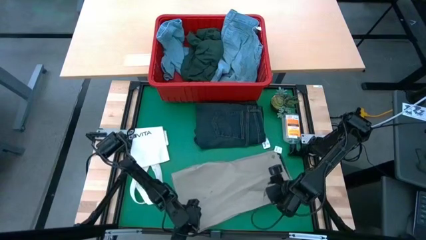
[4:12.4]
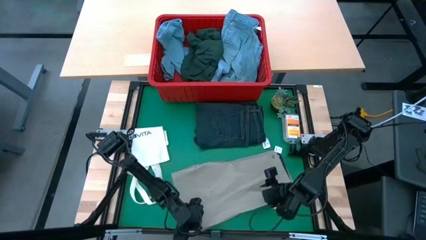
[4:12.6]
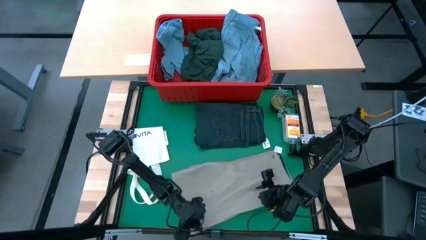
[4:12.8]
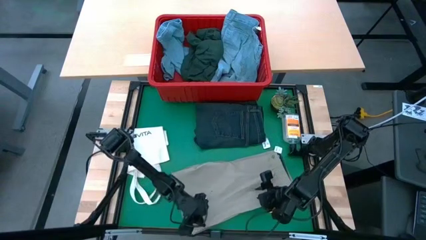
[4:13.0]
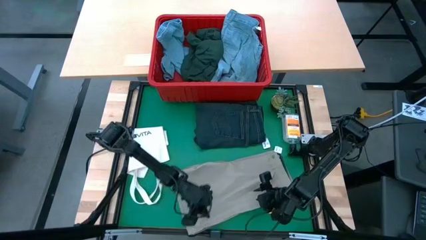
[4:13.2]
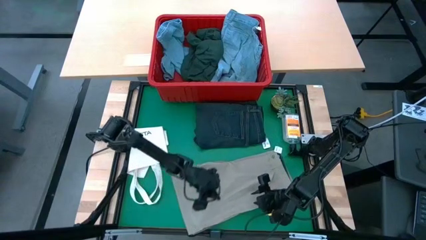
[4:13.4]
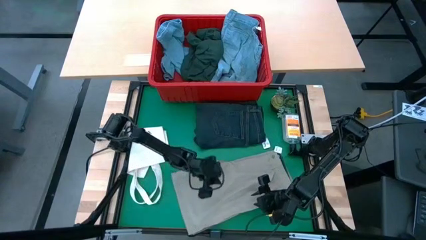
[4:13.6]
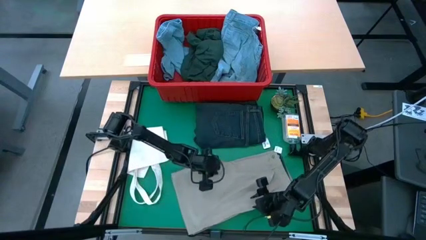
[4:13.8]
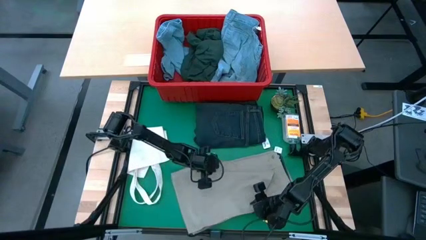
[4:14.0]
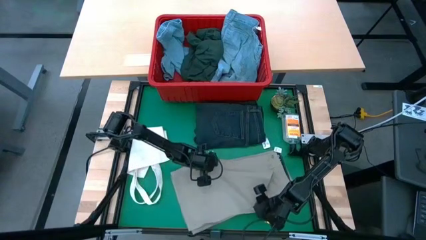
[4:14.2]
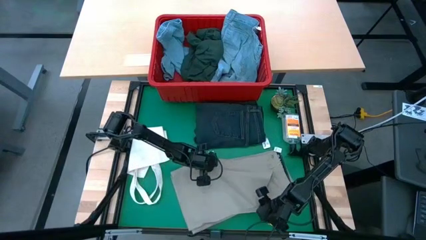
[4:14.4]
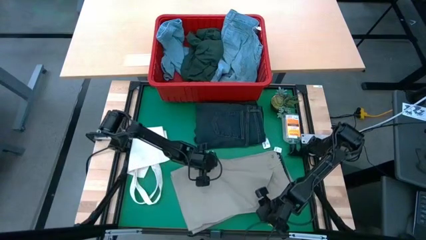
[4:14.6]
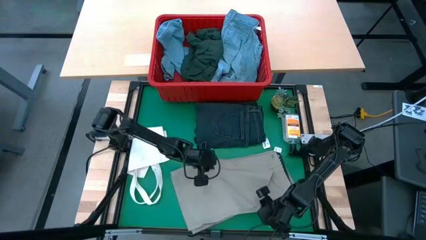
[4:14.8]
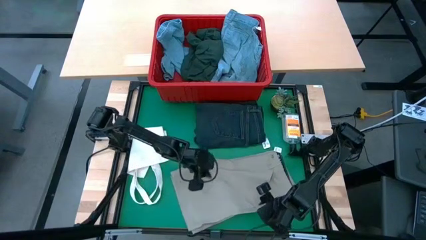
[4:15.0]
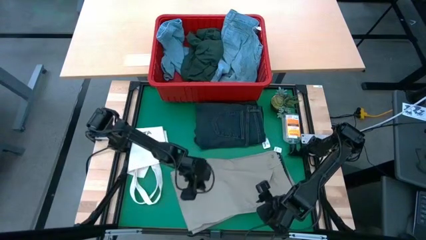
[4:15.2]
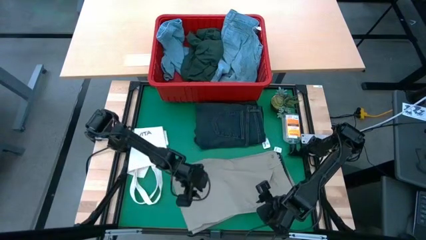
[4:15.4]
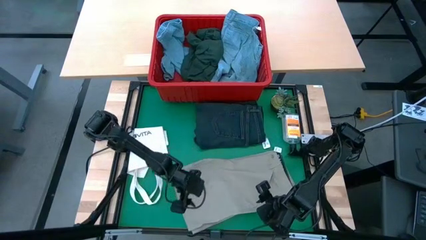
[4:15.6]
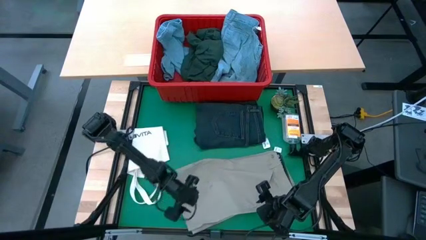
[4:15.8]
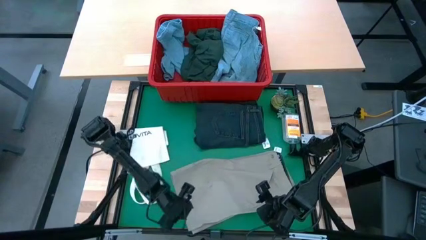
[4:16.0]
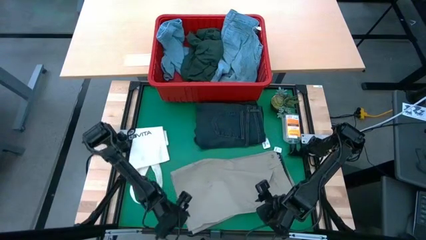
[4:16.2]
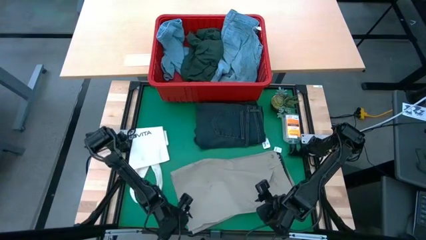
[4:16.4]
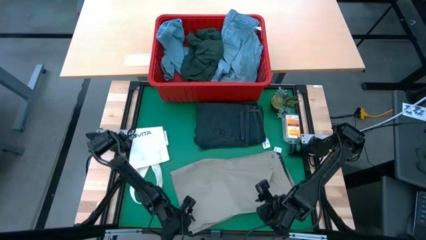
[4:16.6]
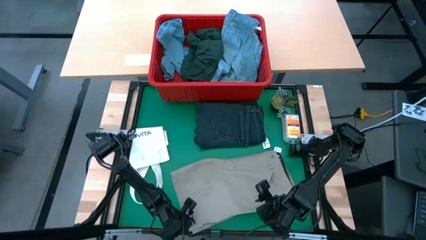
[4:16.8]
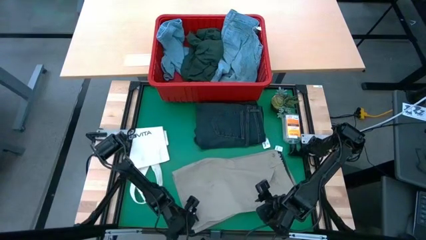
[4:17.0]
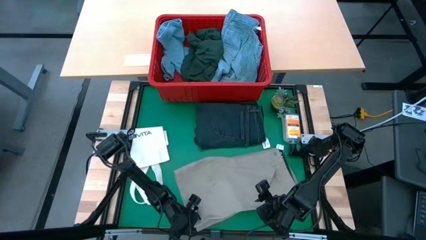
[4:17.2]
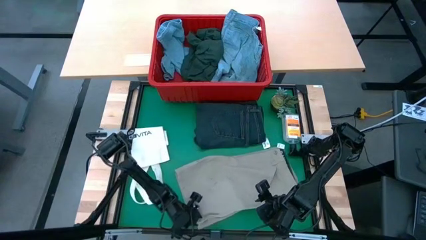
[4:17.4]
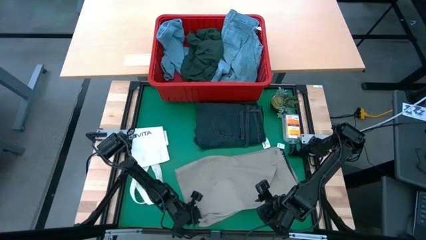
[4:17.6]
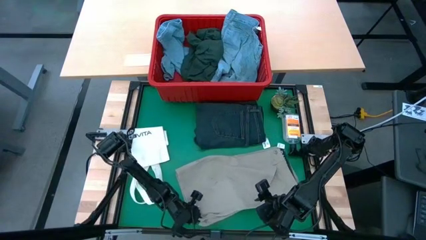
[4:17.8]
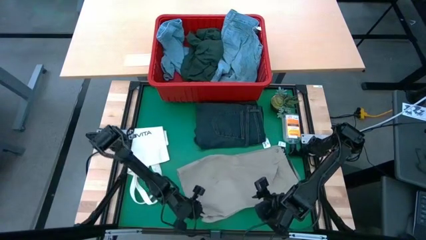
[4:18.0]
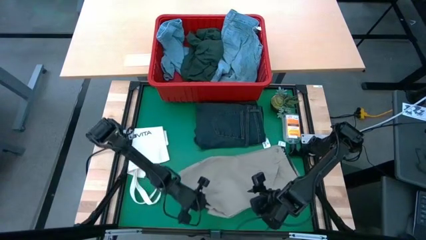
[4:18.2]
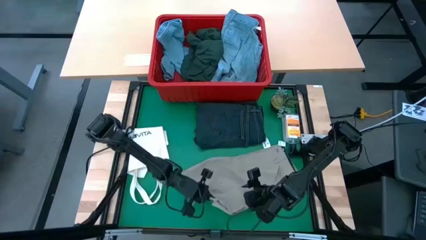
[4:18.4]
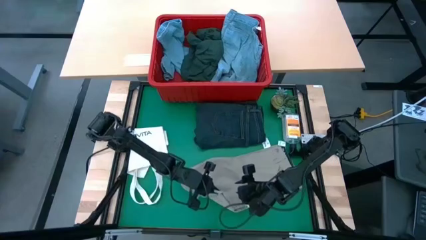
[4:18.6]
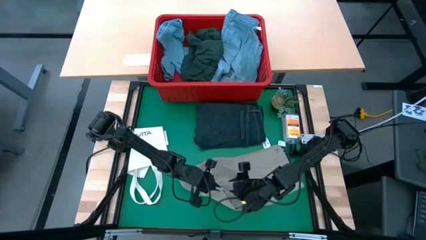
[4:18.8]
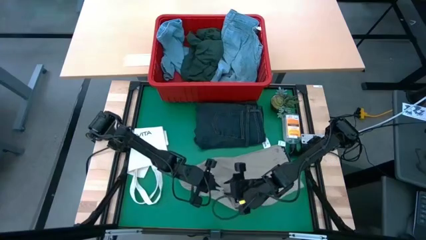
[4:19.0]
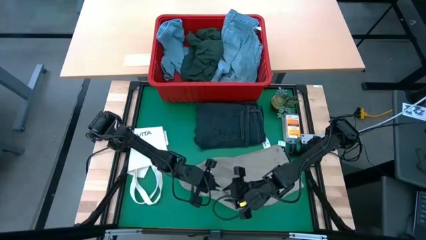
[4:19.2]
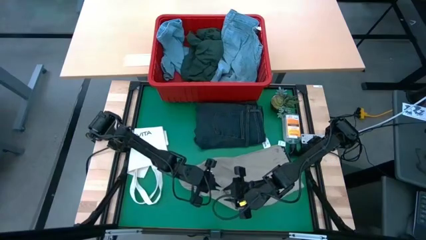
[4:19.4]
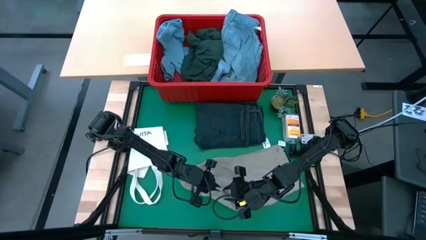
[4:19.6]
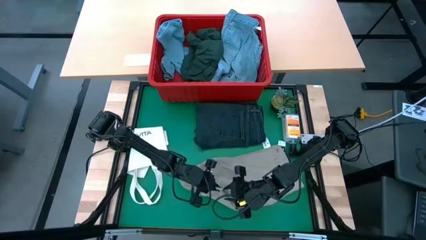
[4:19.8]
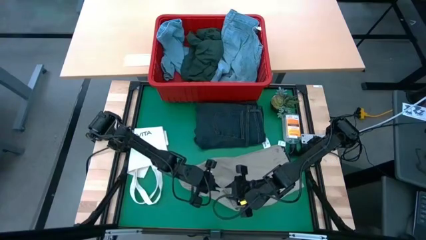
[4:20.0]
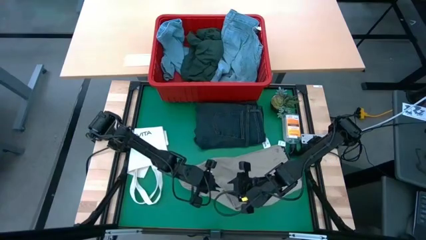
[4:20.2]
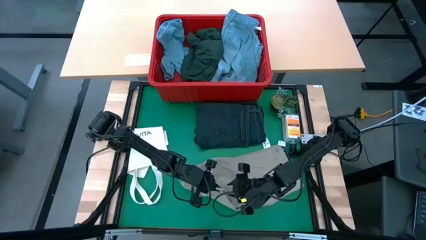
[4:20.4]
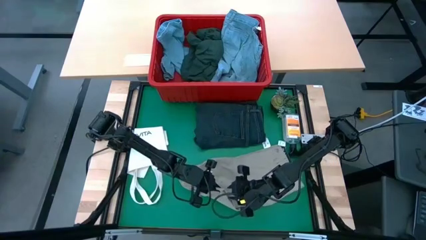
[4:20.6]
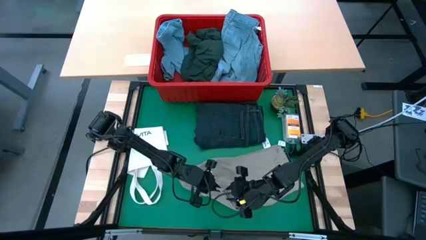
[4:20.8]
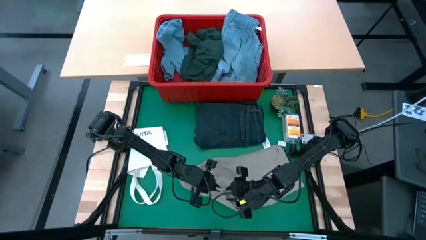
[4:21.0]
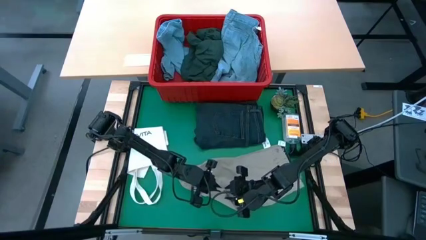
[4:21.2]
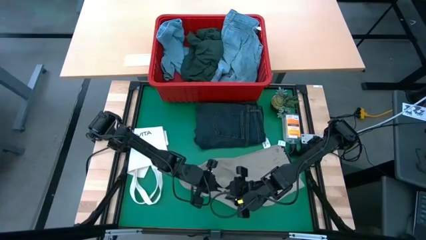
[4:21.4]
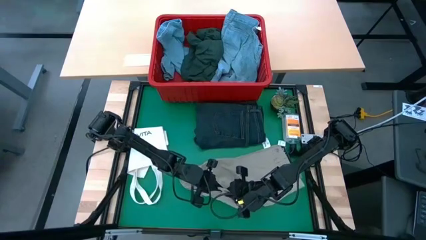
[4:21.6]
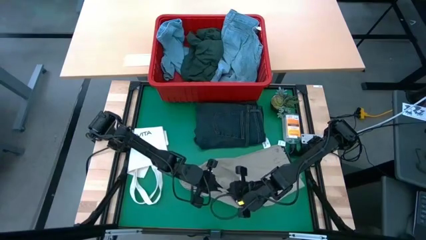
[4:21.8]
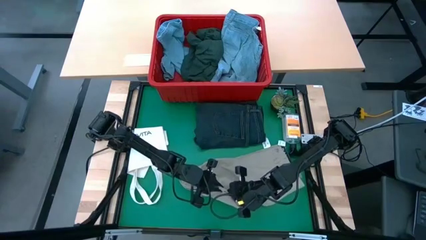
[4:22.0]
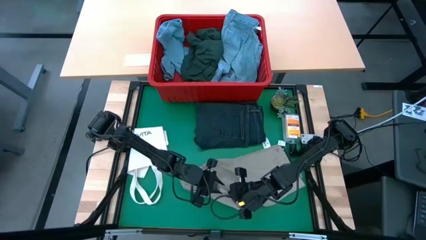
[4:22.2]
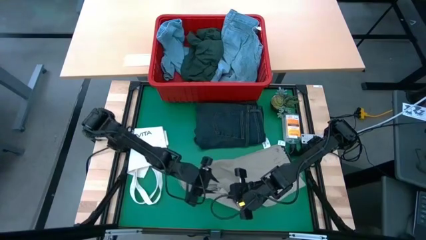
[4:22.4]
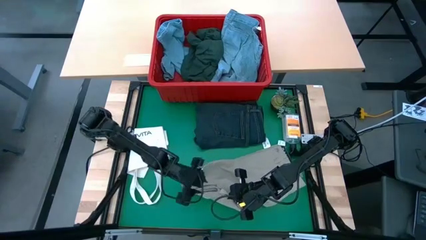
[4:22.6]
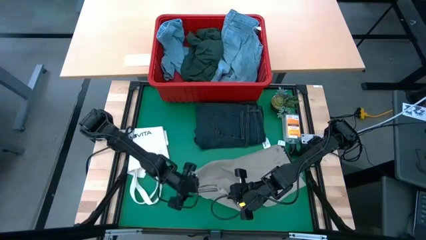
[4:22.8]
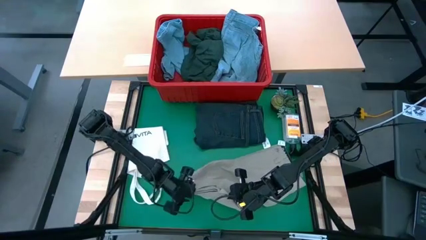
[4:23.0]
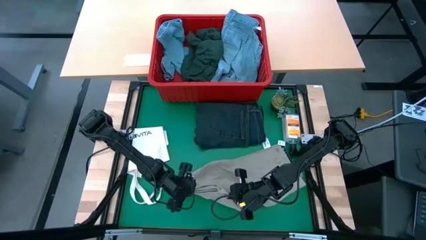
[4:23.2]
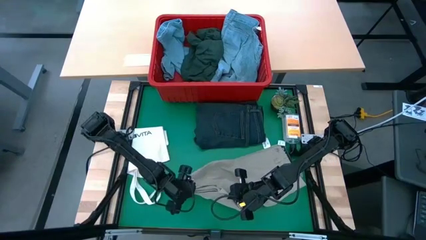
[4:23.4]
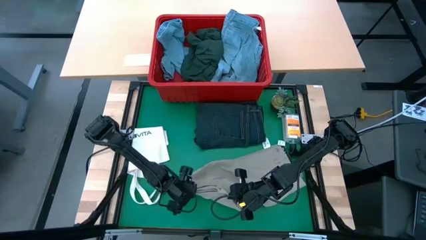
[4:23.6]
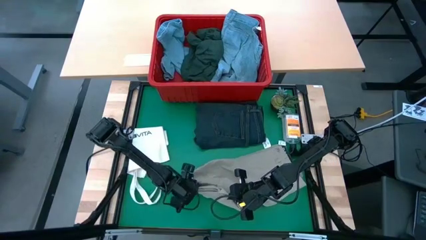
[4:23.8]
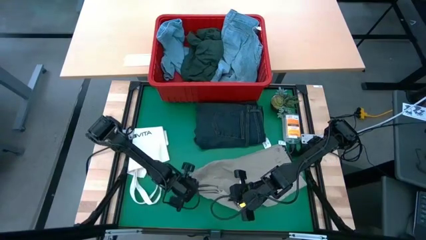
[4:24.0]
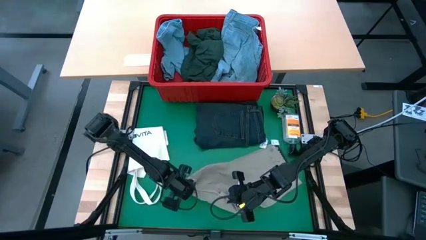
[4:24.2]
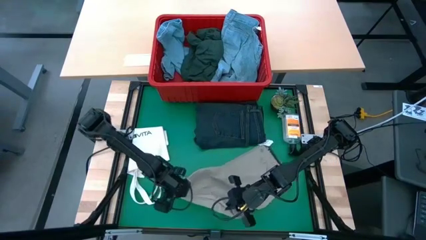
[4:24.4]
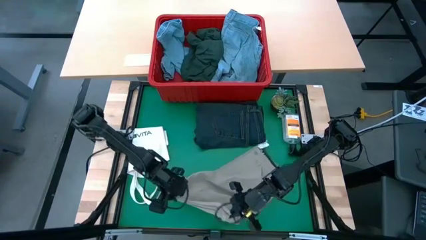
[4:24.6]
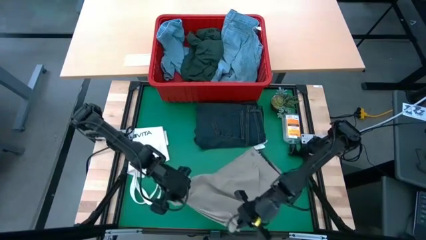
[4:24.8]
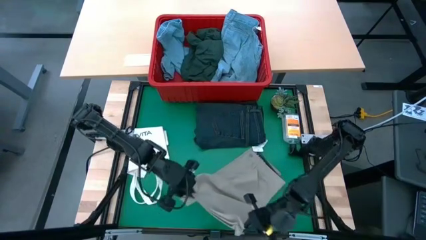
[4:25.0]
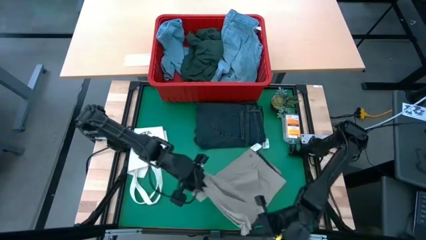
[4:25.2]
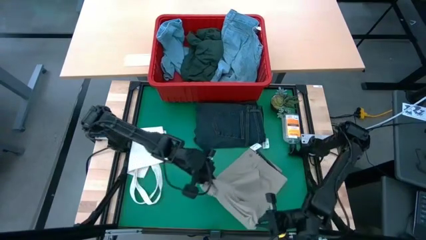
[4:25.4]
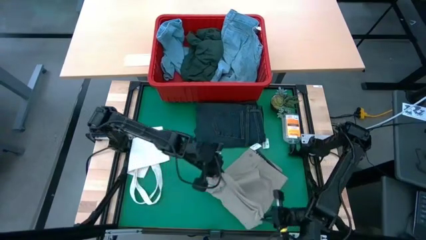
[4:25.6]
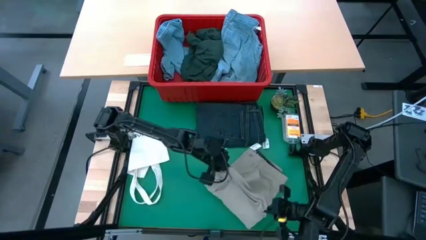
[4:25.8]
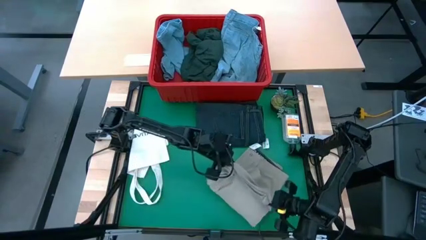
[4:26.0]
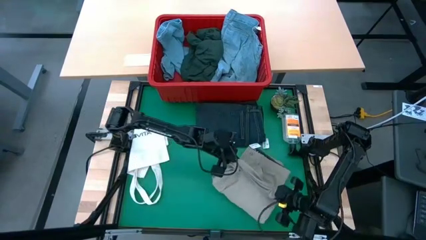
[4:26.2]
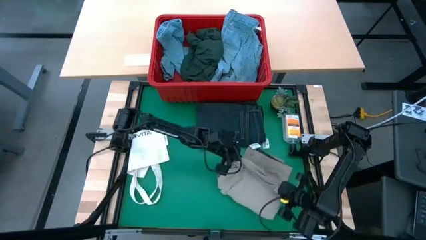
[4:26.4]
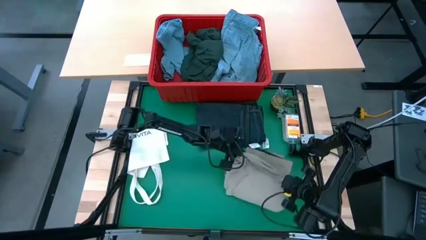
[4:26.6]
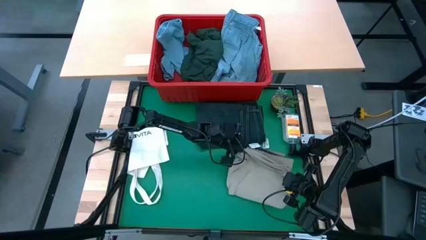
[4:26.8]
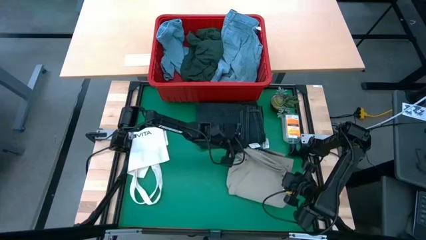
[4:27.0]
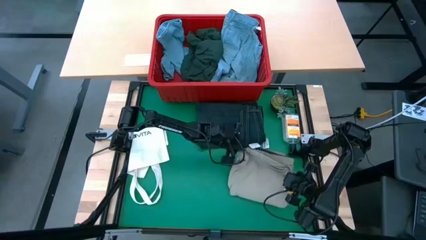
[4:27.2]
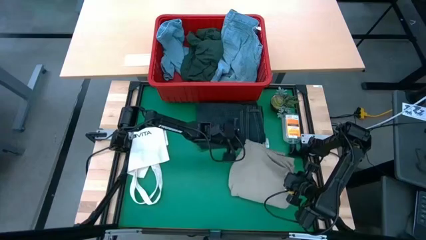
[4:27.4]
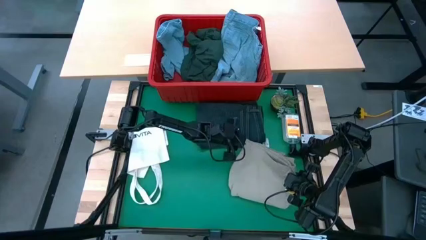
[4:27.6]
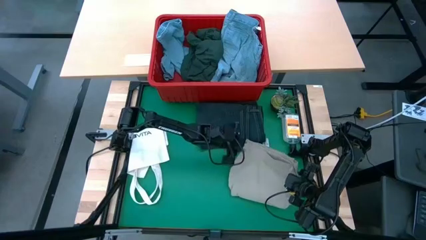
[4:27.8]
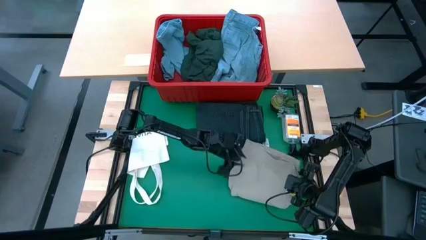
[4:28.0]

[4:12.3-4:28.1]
Task: Fold laundry
Fold the brown shorts

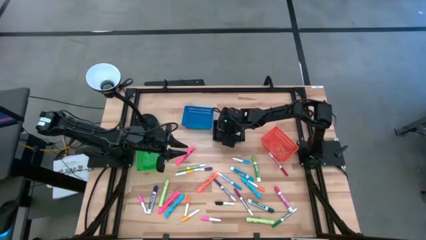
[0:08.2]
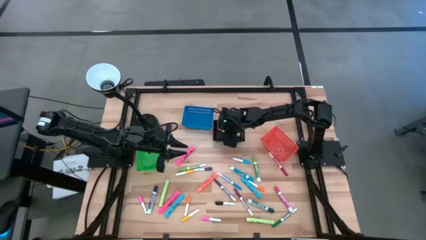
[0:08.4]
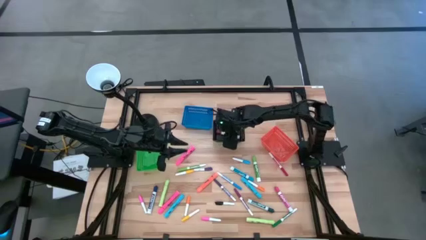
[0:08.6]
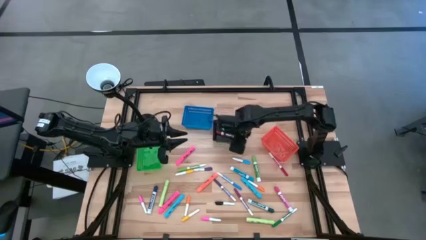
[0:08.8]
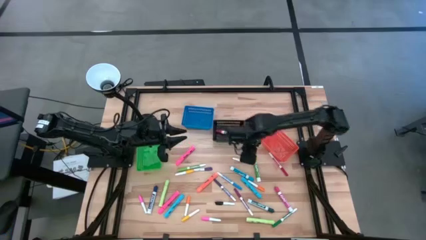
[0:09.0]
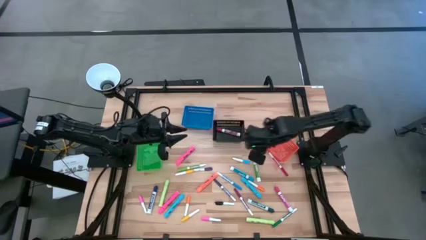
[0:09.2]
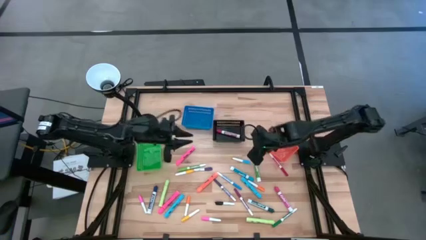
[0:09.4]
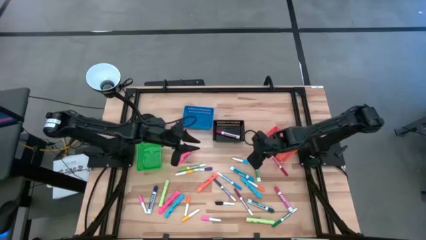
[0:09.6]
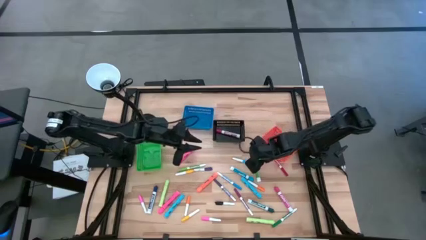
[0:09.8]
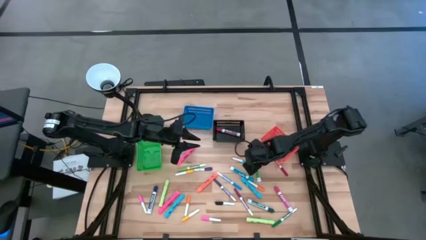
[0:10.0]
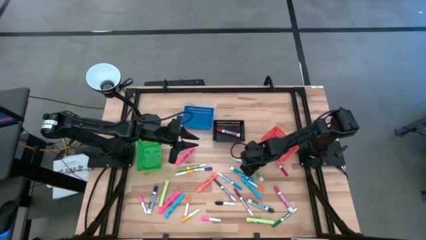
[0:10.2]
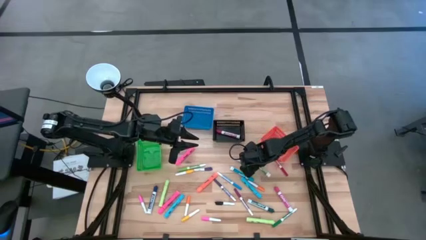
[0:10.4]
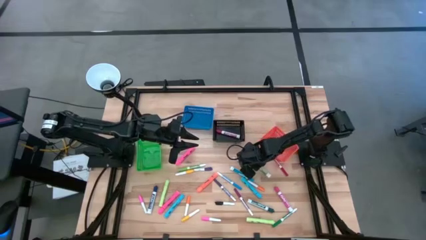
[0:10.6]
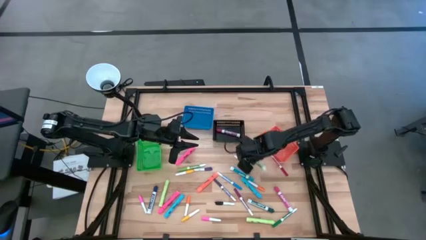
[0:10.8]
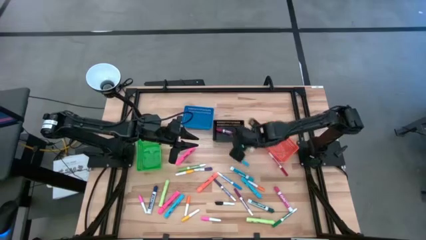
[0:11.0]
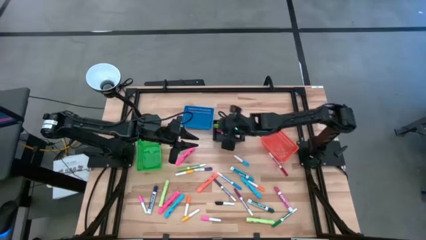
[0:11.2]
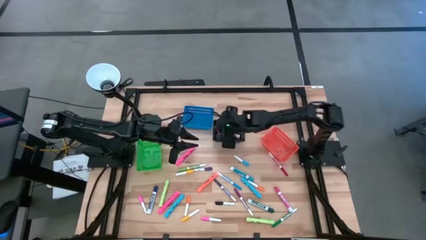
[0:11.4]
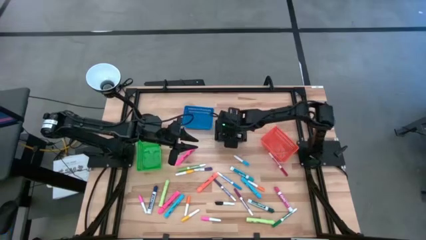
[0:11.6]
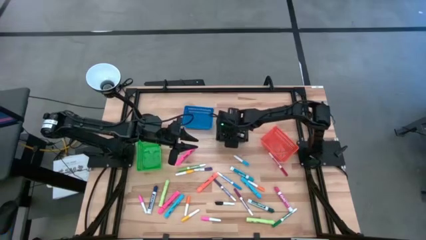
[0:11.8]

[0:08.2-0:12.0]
Task: Pick & Place Markers
Put the light green marker pen into the black basket
